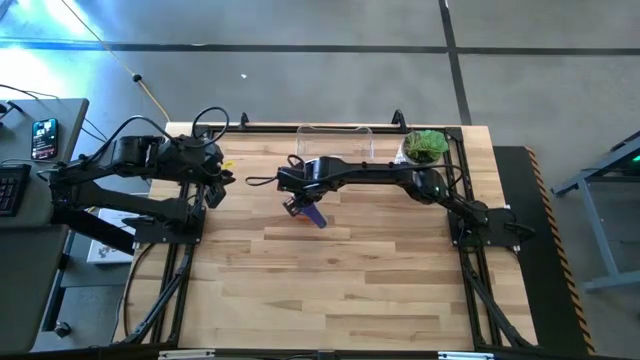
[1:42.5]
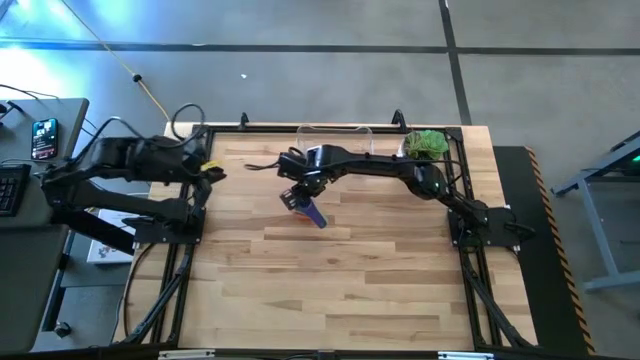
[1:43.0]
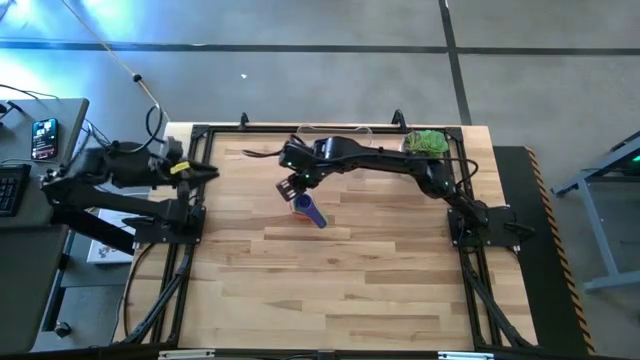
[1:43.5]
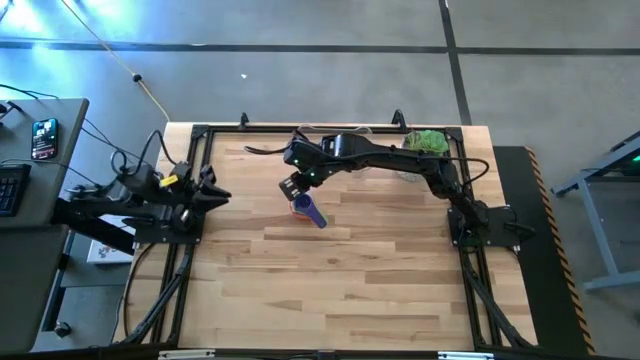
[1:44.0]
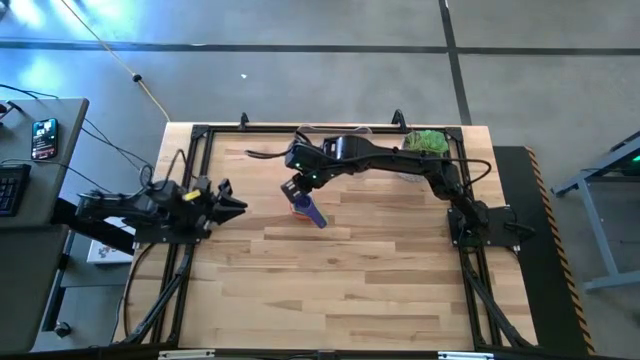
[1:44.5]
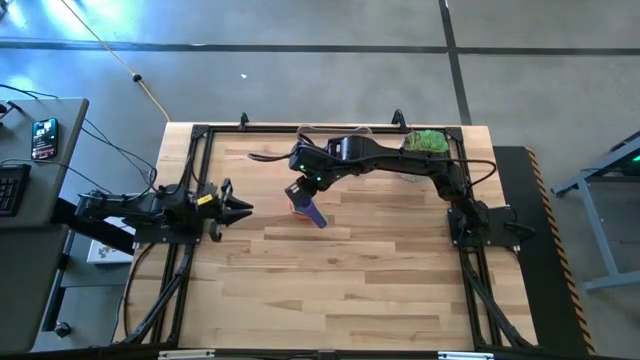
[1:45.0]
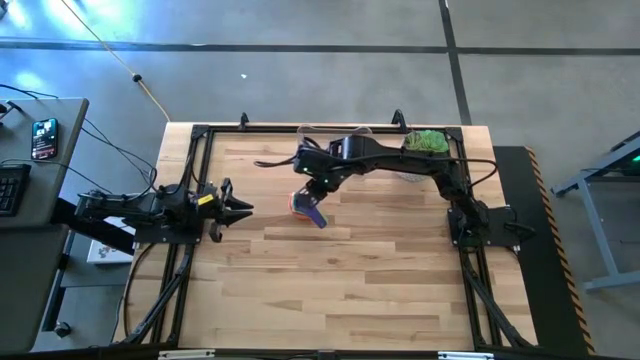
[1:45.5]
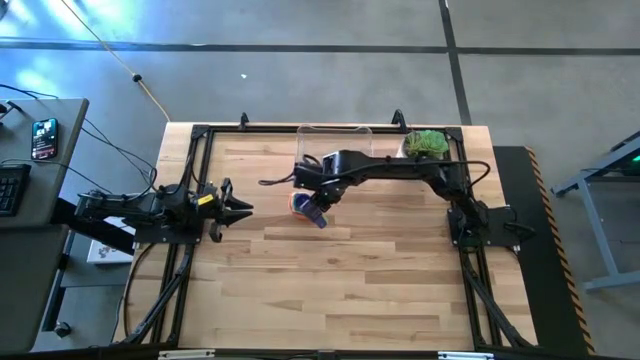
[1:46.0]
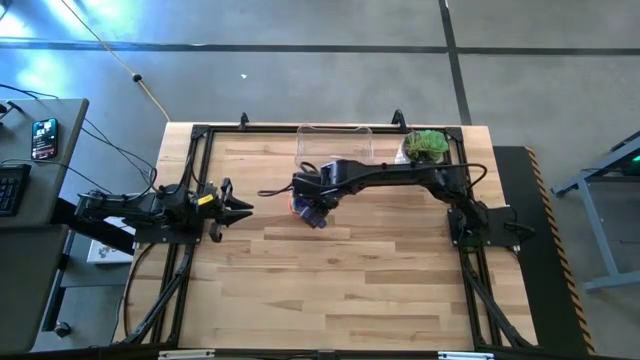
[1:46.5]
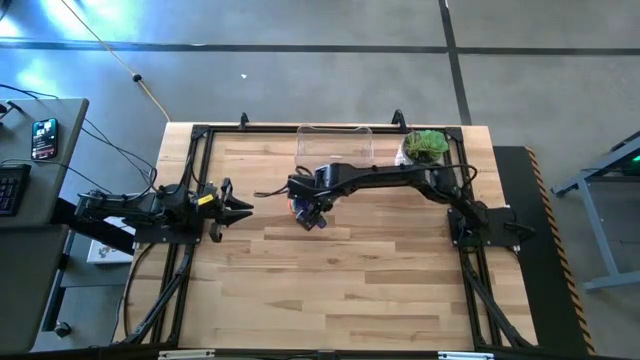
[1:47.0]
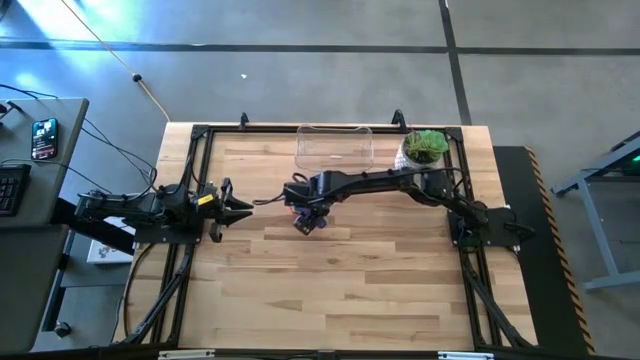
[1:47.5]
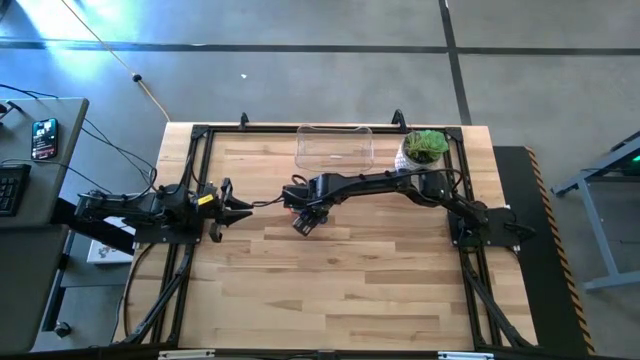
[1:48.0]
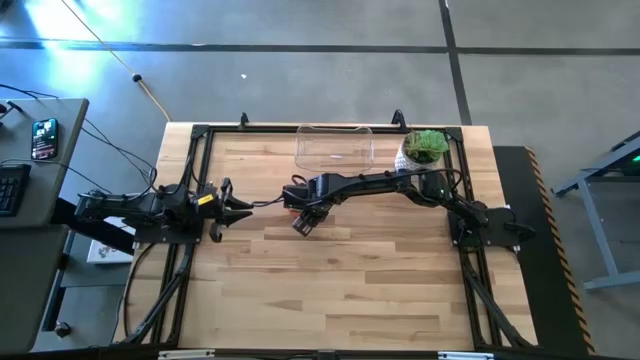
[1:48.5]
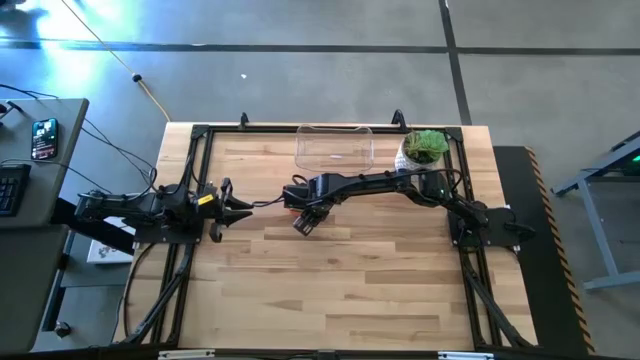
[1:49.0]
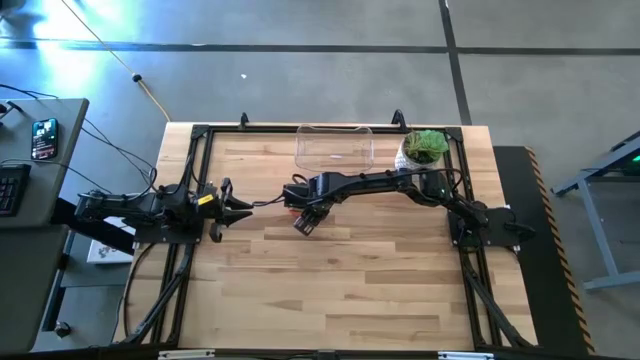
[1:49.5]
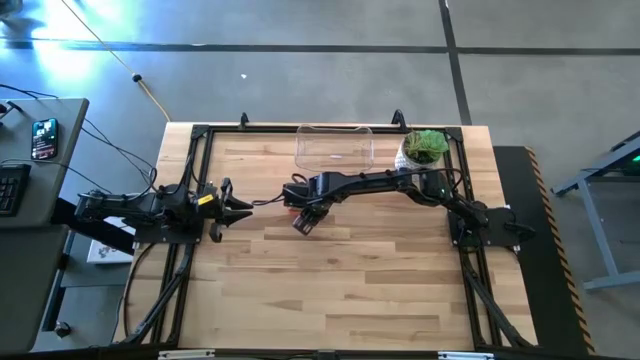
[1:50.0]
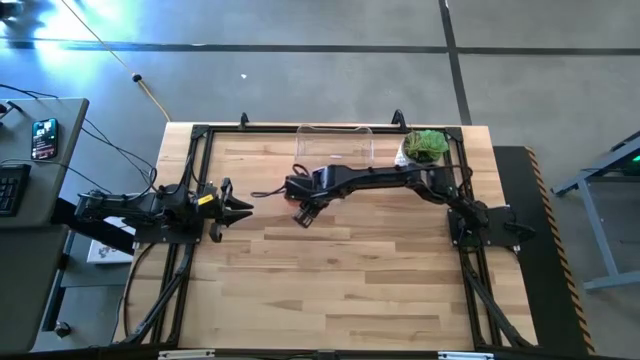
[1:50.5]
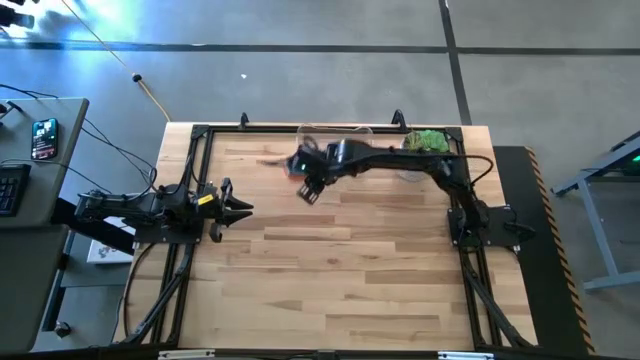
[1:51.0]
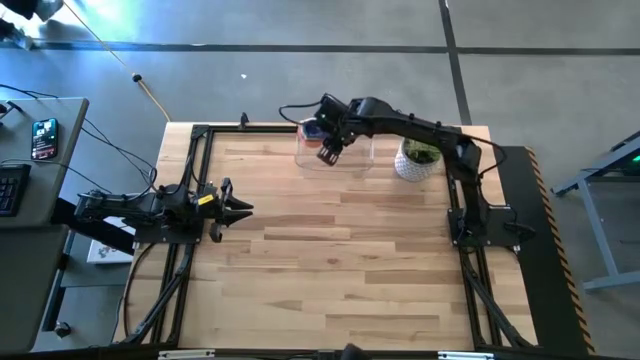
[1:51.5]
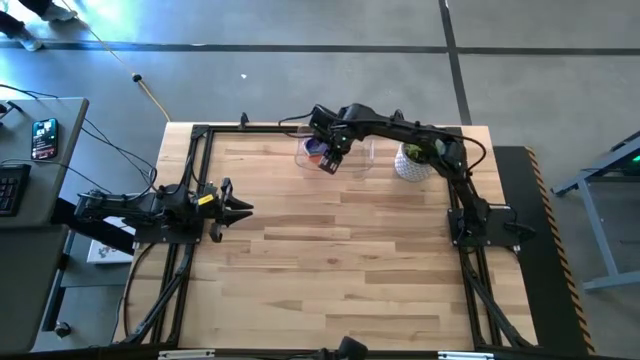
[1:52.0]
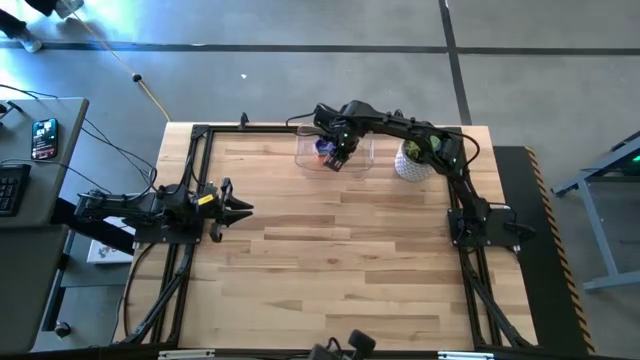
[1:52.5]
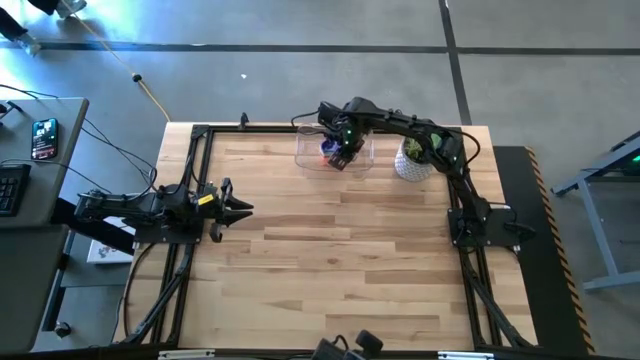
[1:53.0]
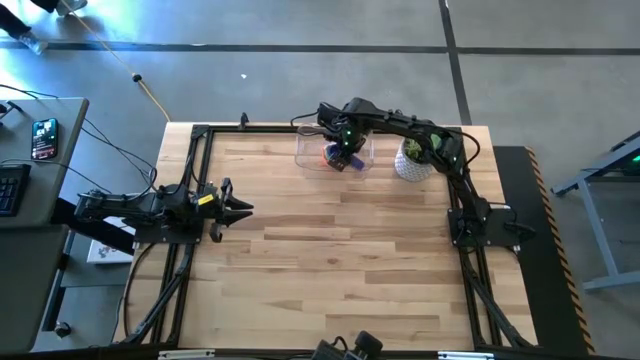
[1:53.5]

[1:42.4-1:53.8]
Task: Nest measuring cups in basket
Put the stacked measuring cups into the transparent bin

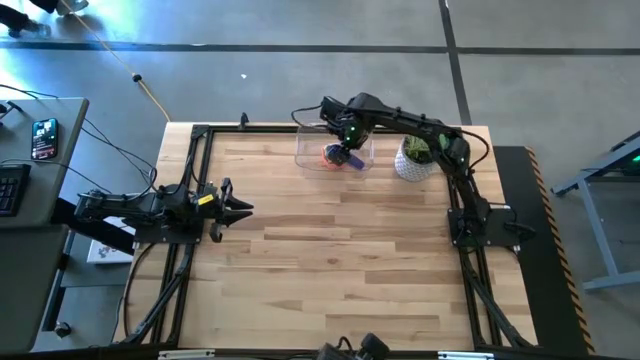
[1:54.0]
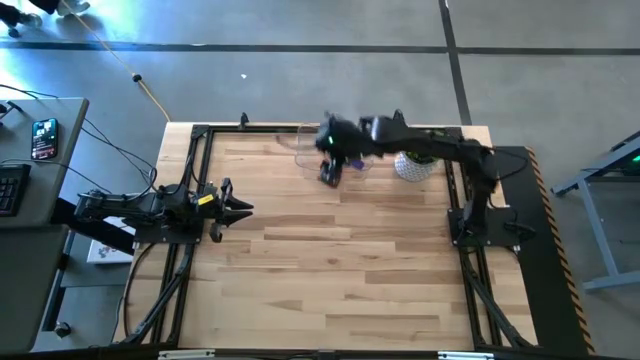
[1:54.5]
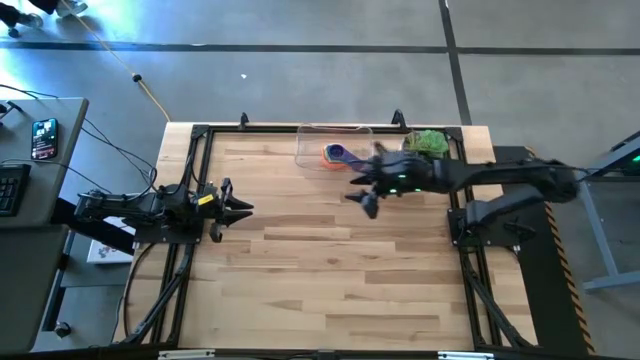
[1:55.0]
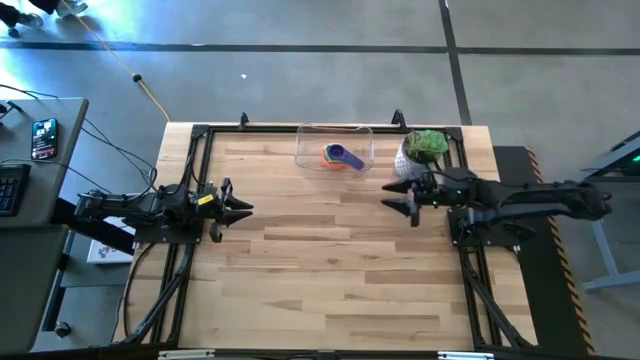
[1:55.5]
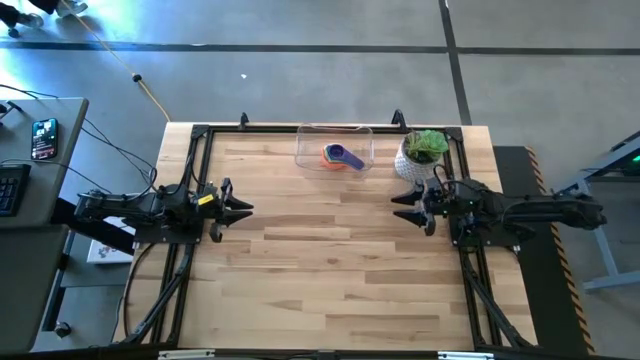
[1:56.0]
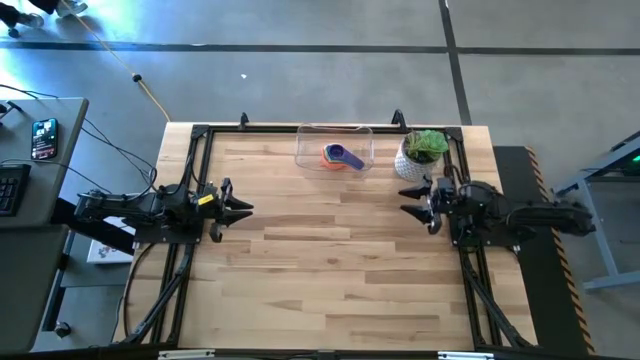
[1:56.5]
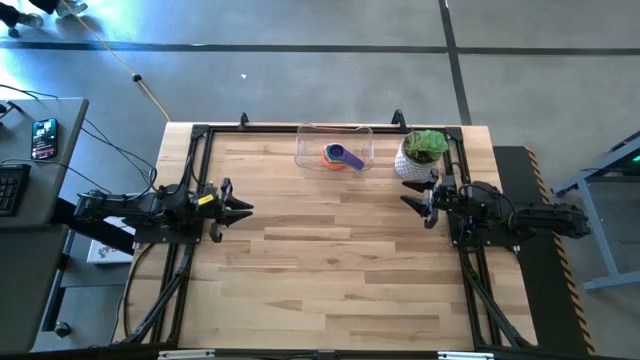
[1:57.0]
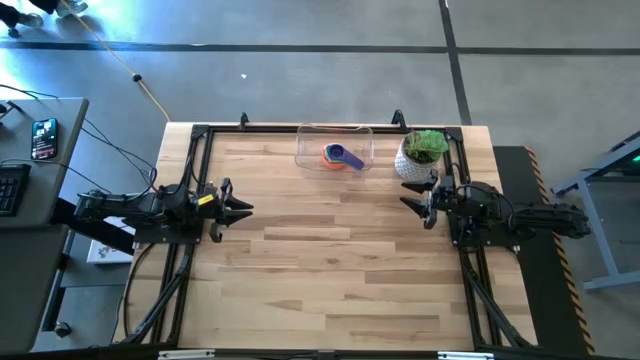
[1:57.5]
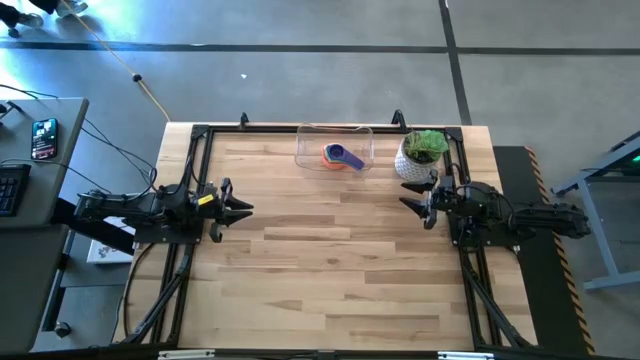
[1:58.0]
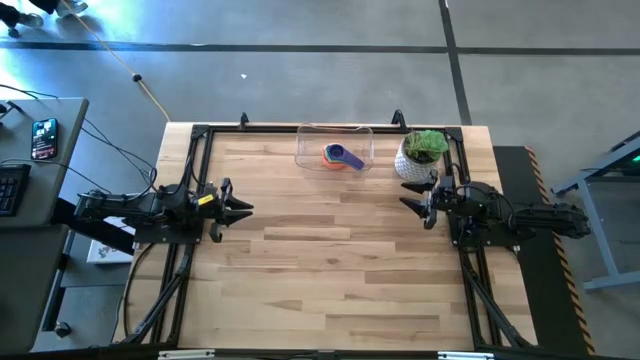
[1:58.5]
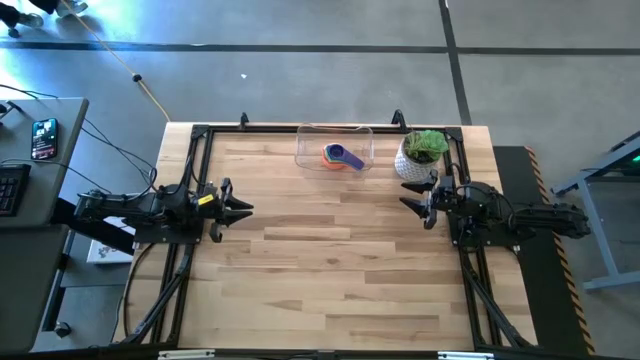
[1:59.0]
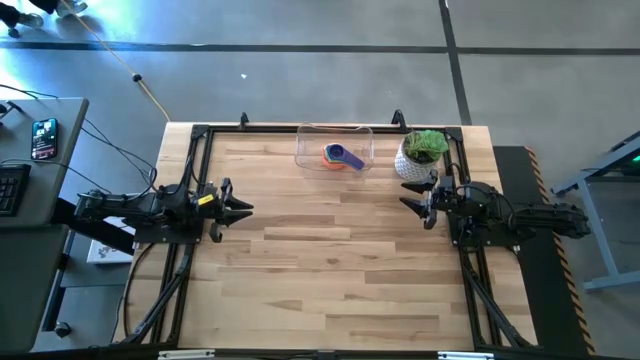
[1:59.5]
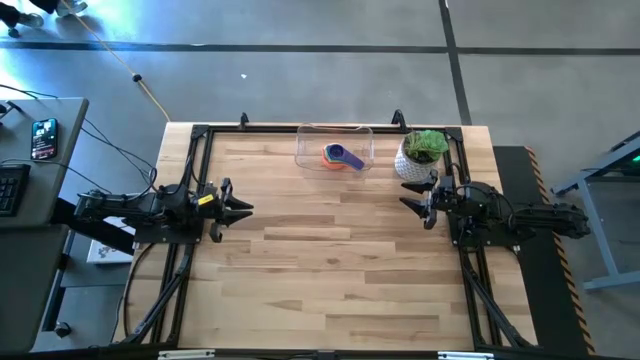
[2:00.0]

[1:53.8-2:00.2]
Return to Home Position

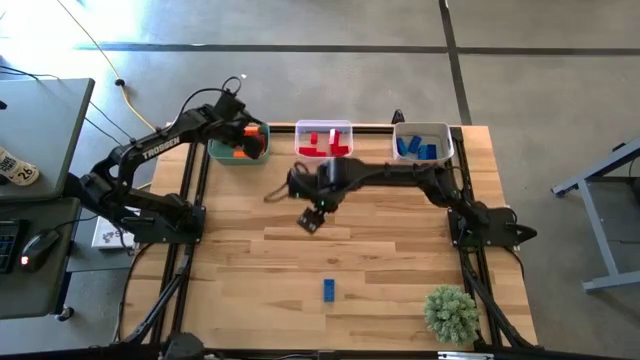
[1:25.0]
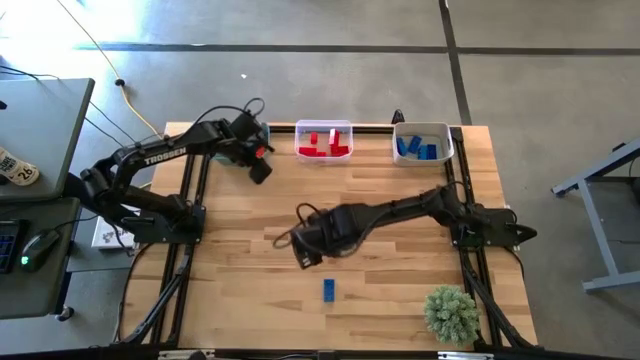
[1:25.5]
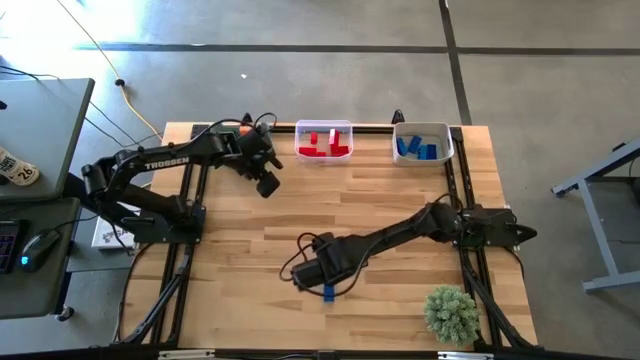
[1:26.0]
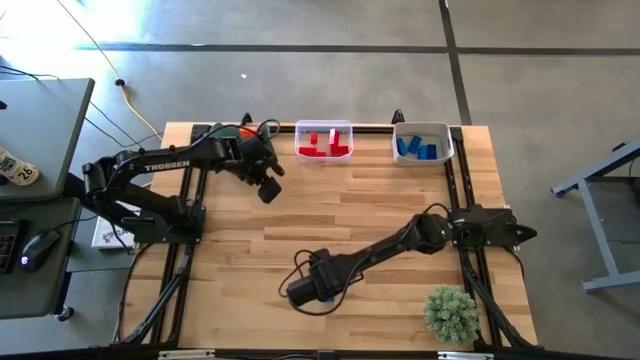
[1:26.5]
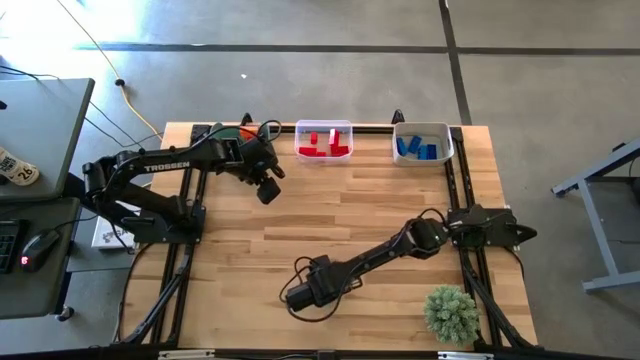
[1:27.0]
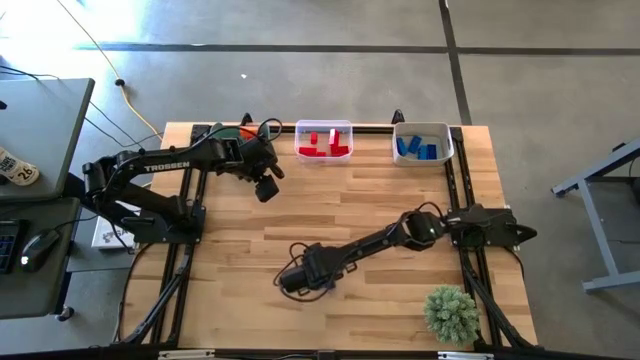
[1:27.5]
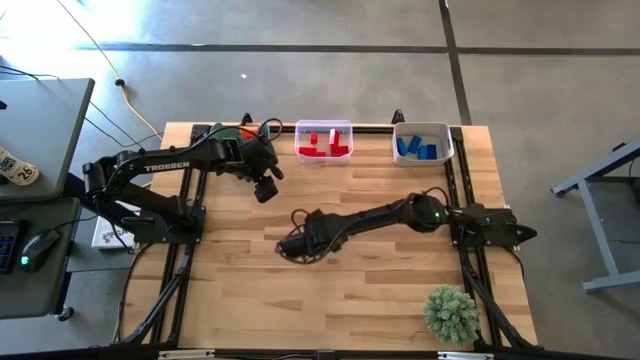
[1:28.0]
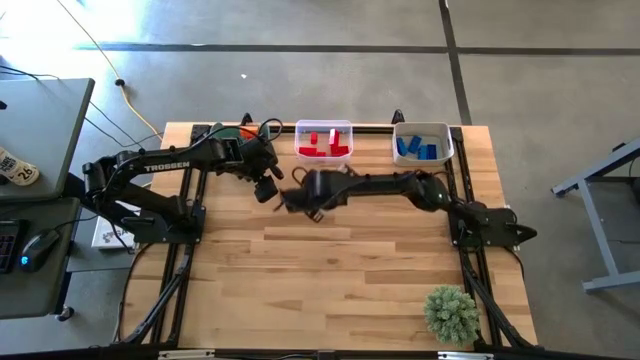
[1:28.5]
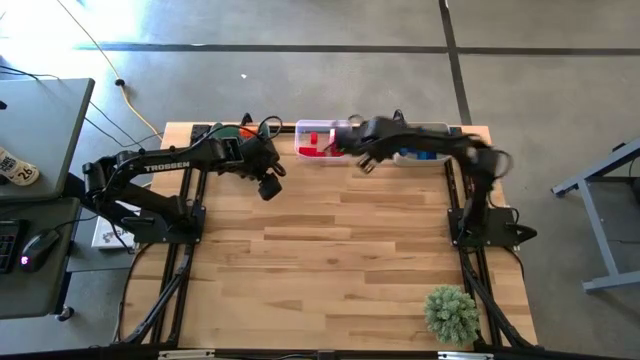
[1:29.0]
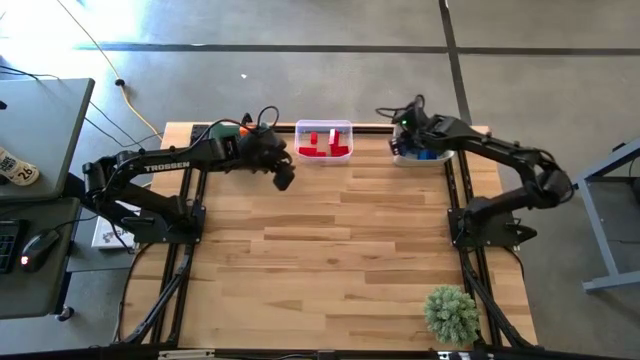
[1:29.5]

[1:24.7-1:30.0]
Task: Sort & place blocks by color
Put the blue game piece into the white bin
